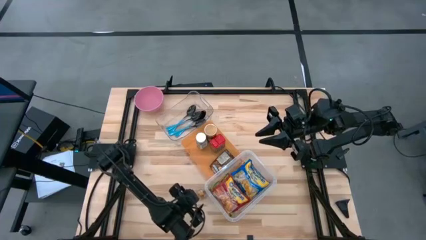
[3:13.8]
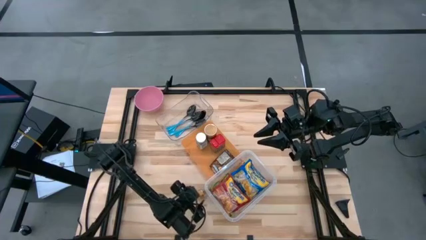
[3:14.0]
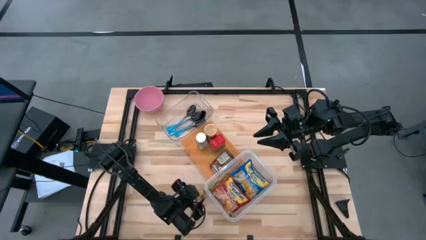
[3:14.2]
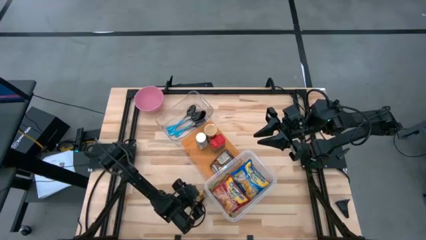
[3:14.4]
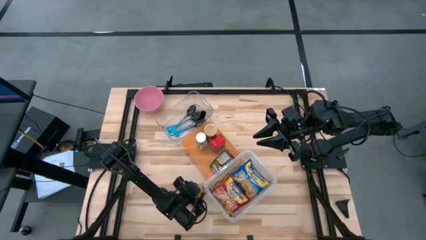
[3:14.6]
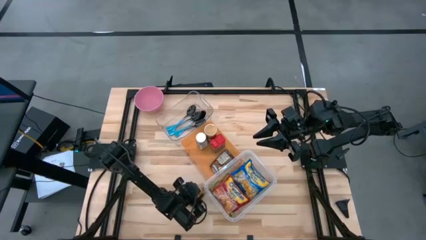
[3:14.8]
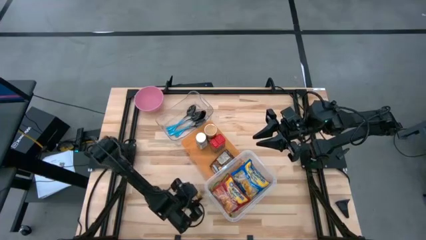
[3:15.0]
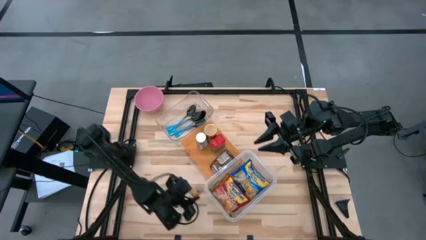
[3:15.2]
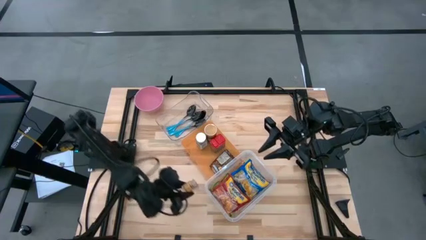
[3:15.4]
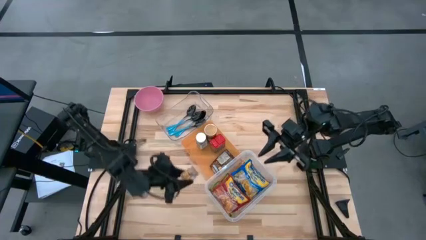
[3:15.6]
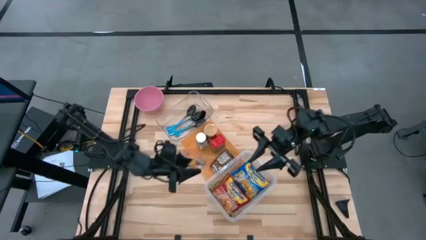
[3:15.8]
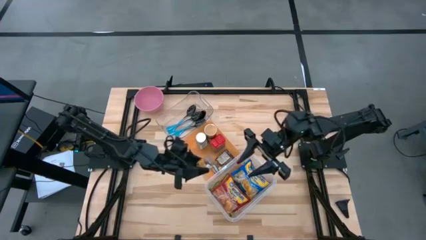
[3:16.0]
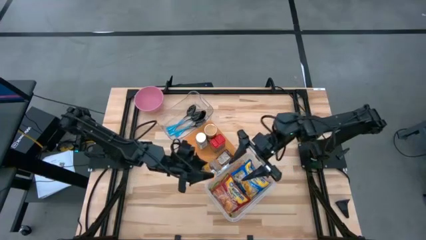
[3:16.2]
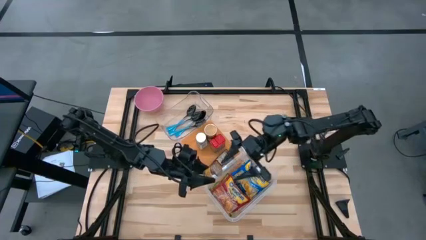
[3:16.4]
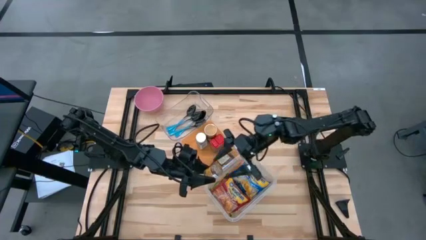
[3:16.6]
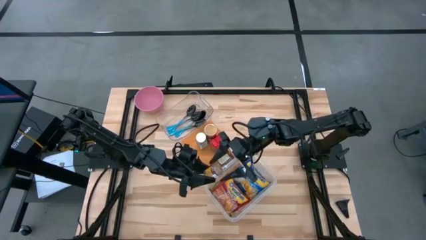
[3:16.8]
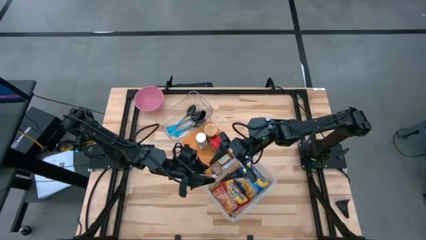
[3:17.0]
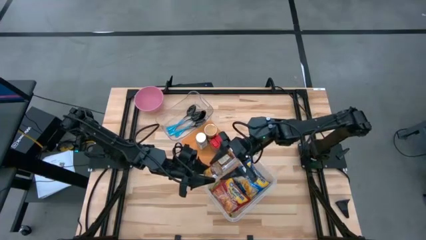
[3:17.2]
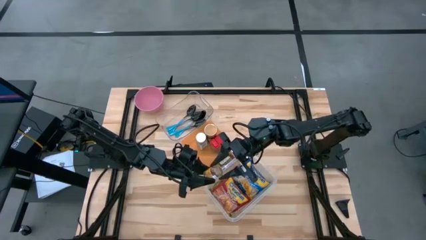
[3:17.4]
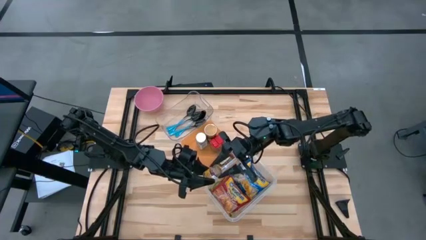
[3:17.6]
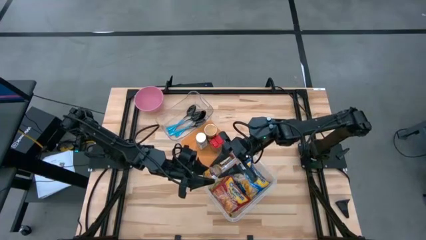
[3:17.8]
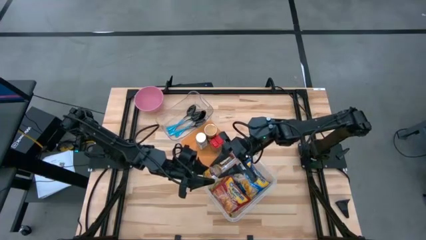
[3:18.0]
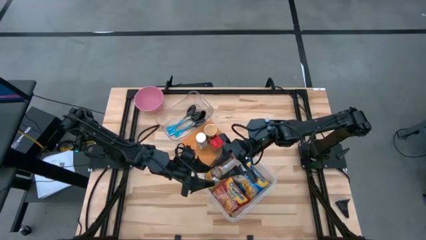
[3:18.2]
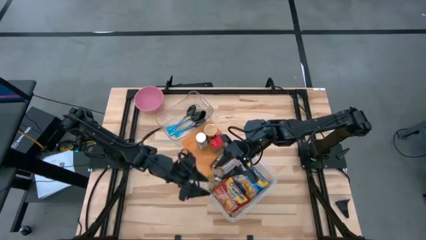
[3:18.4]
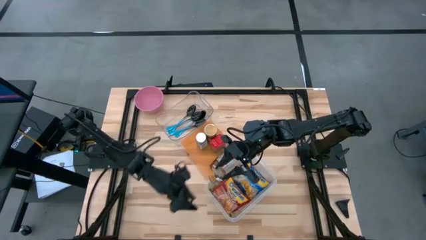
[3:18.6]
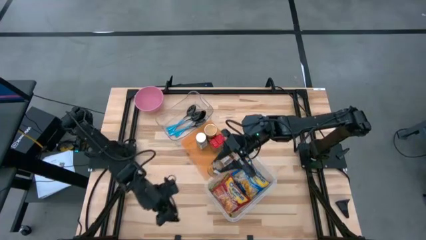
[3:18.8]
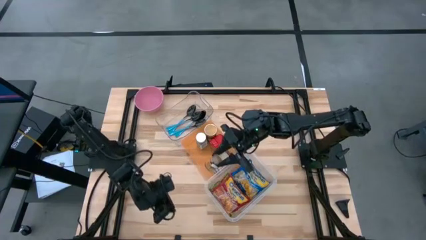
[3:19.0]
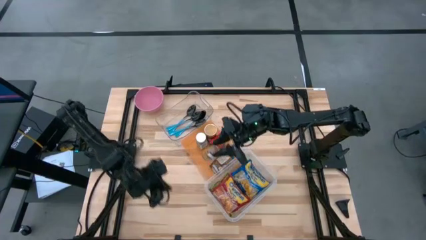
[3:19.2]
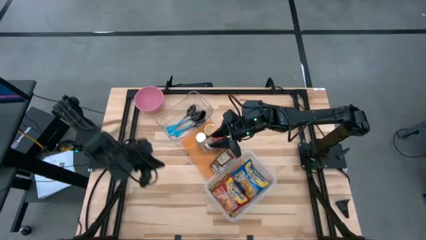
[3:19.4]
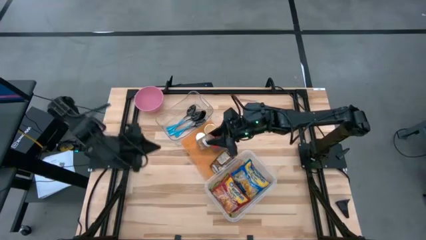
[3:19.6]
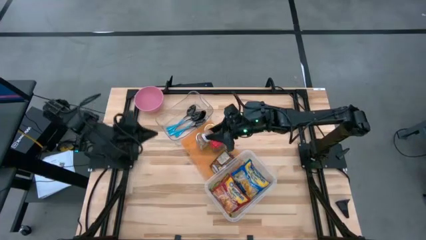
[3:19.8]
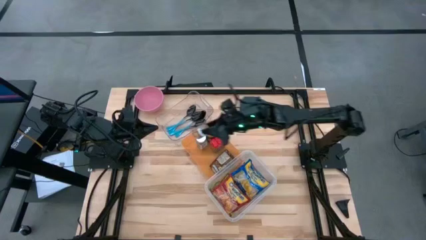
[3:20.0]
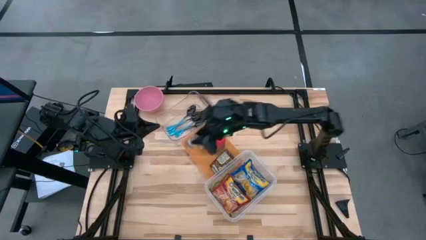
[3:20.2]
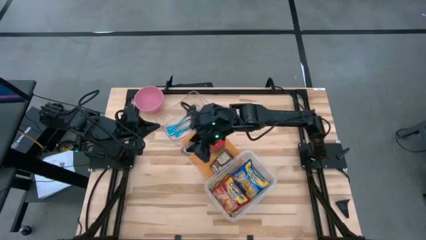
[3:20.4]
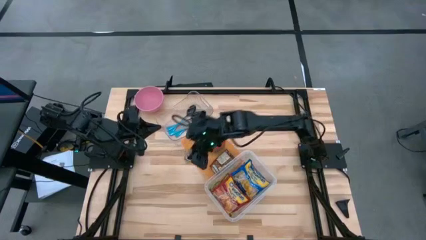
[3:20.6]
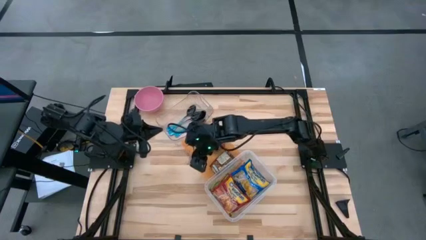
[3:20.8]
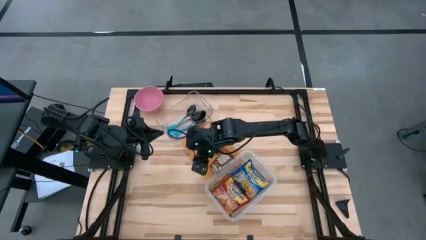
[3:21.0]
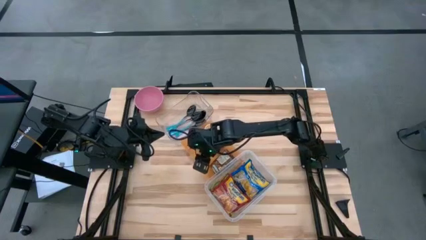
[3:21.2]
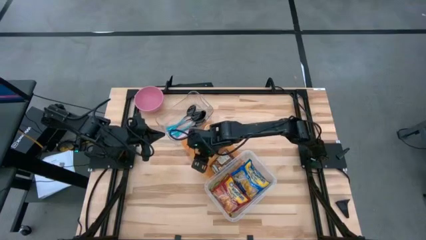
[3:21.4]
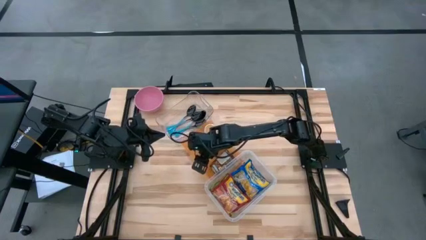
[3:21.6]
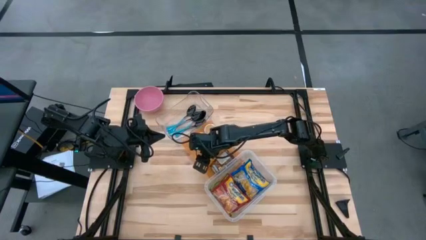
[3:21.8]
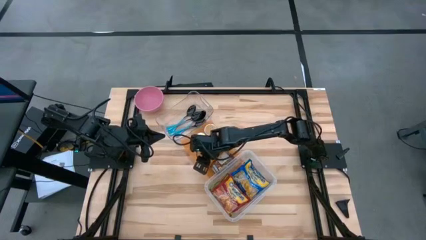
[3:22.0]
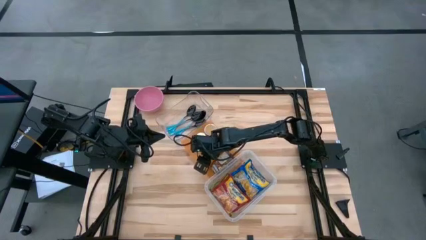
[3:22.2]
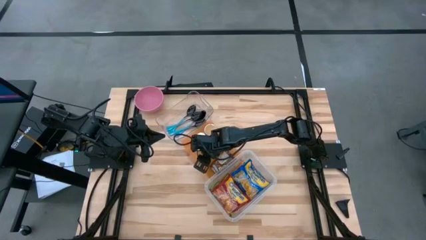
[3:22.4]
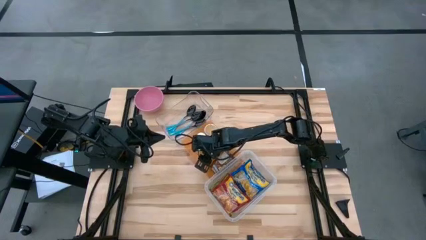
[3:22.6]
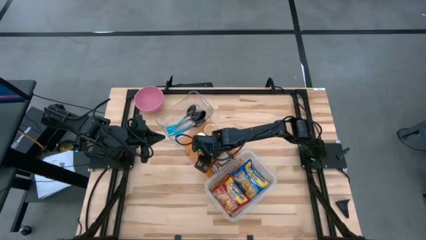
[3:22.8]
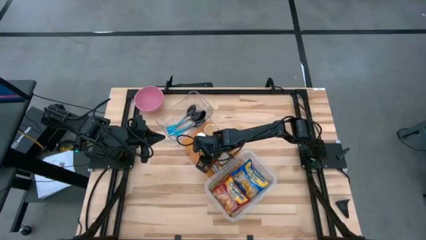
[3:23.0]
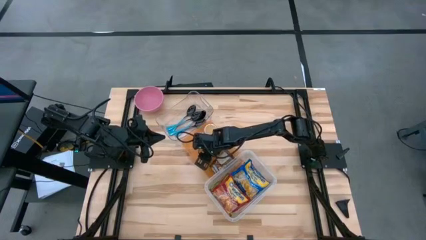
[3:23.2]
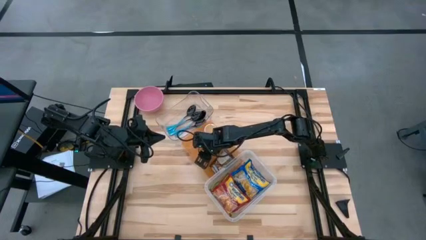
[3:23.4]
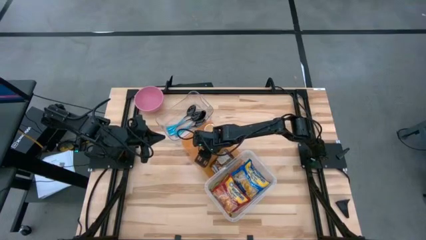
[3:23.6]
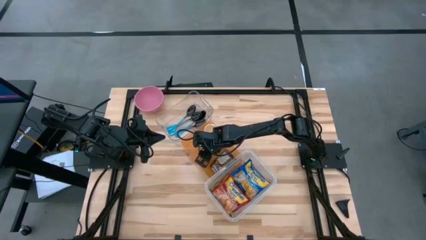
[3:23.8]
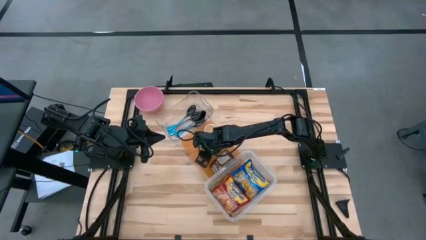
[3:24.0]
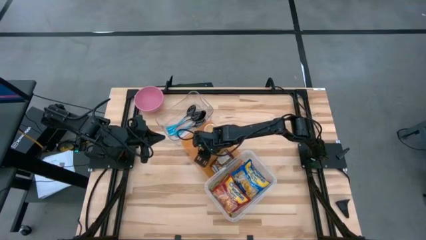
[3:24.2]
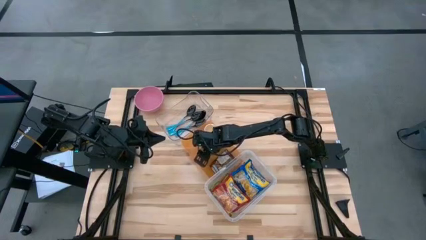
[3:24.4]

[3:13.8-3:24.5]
Task: Pick & Place Food Item
Put the brown seasoning bottle into the orange bin

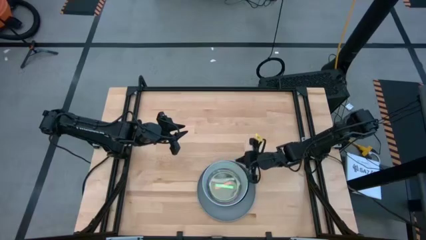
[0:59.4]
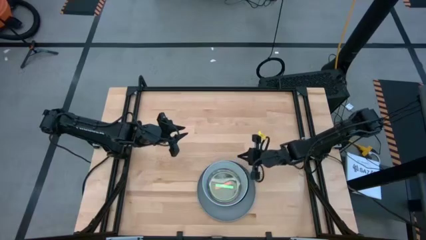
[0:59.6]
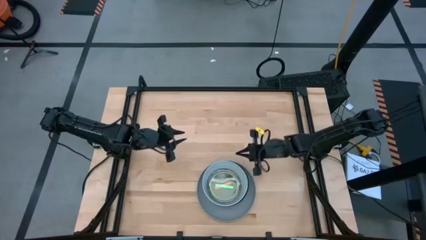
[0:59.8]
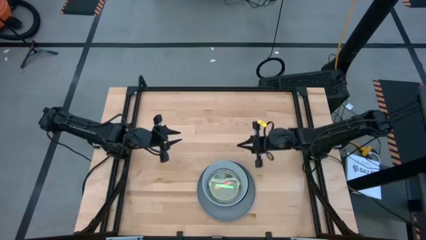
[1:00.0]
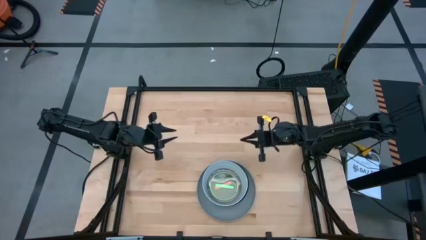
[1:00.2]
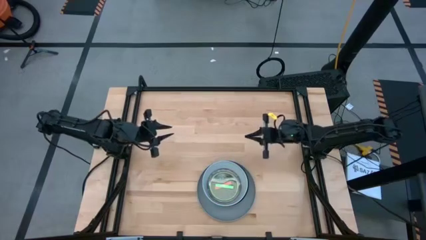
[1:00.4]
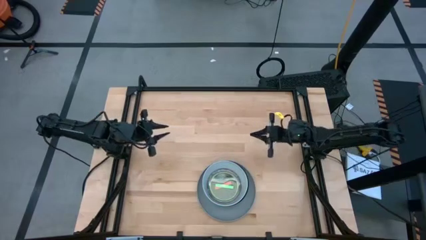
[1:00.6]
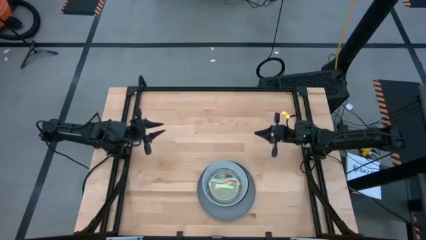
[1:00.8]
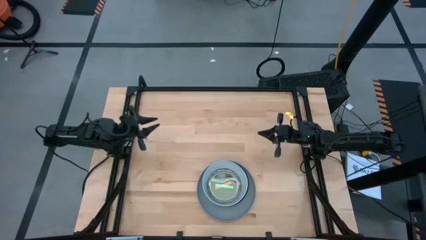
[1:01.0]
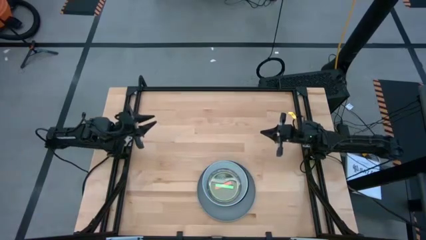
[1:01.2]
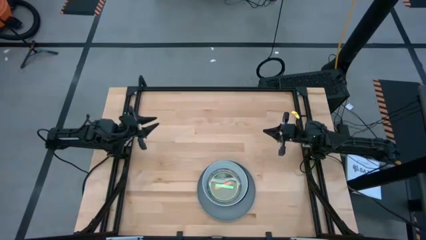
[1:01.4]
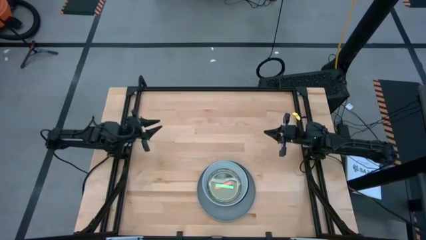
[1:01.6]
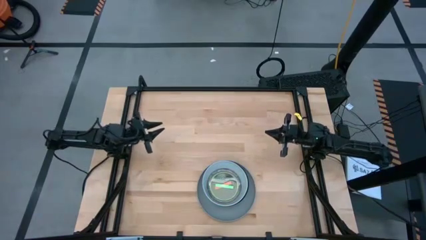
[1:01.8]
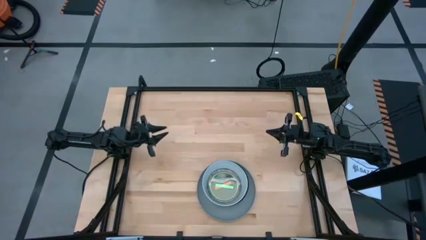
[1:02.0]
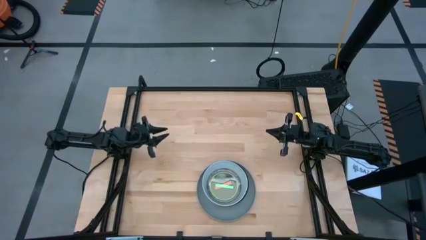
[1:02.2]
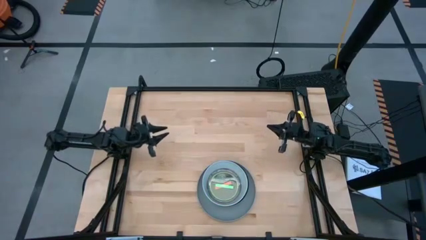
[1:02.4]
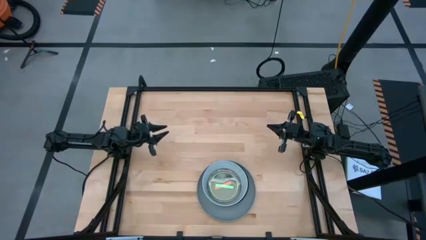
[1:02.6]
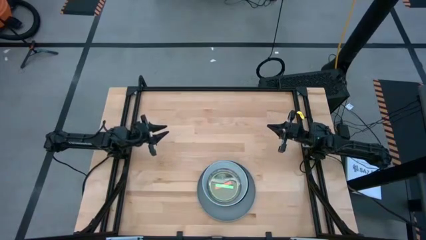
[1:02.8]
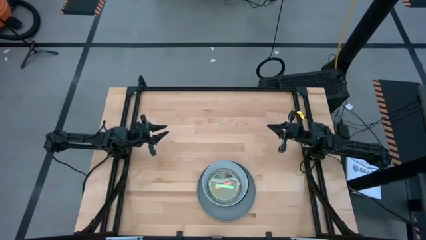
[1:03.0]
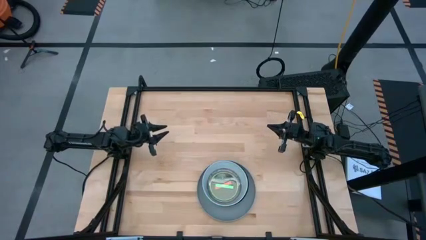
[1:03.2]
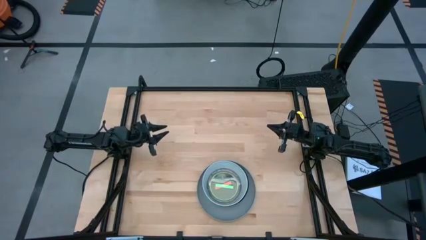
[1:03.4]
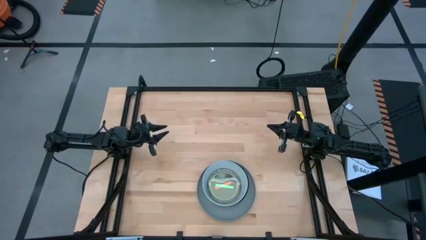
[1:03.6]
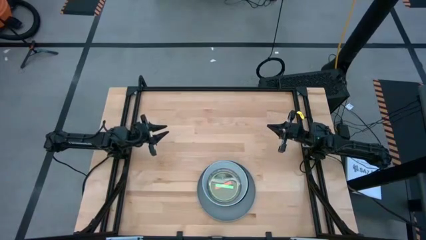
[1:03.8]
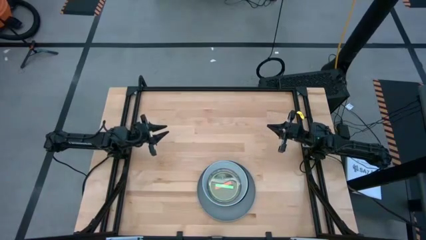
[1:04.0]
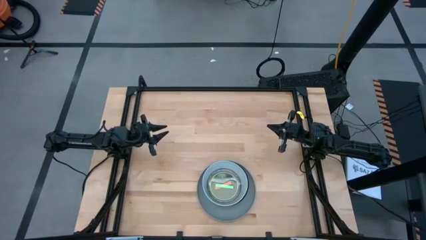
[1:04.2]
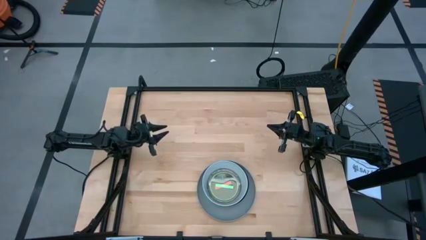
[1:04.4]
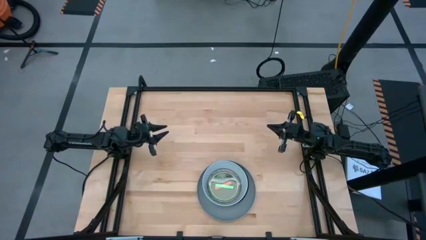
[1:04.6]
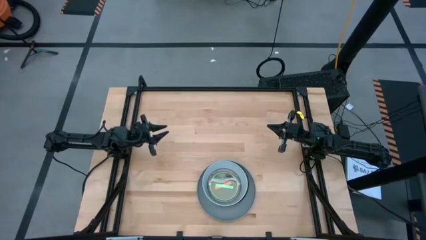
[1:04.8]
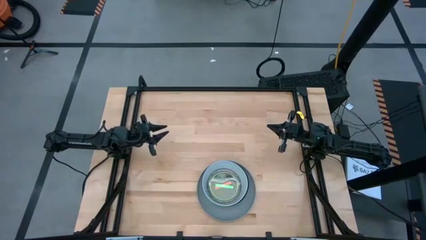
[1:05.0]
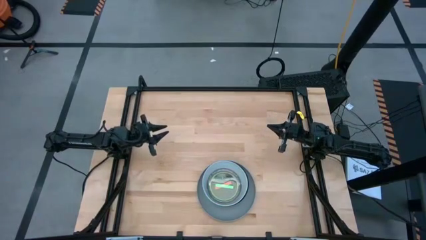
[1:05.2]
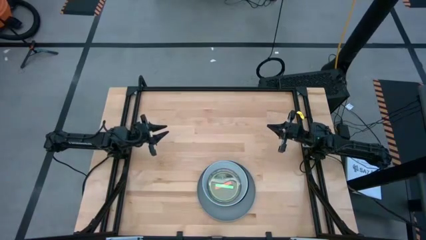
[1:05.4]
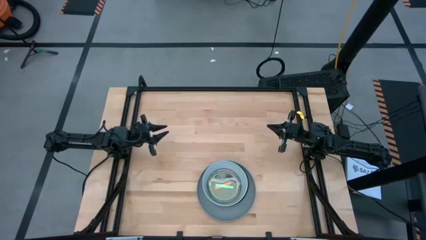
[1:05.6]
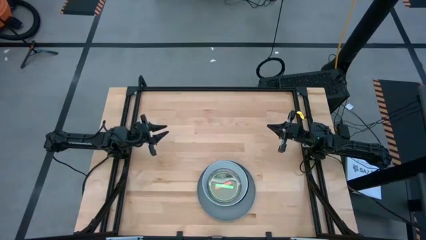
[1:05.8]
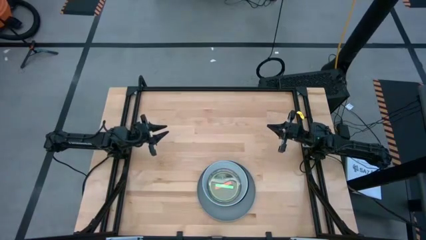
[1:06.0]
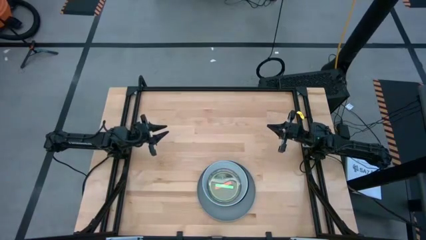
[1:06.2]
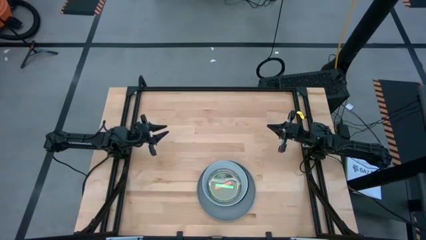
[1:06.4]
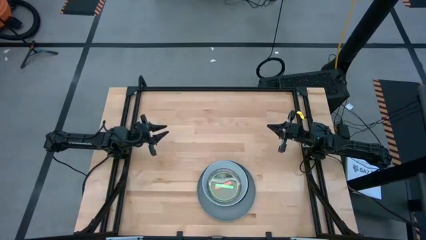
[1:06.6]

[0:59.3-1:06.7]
Task: Stack plastic plates
Return to Home Position
